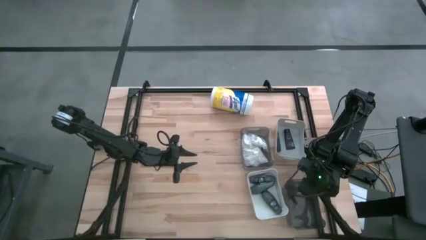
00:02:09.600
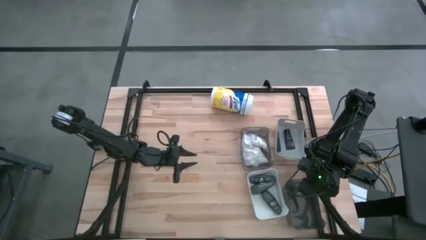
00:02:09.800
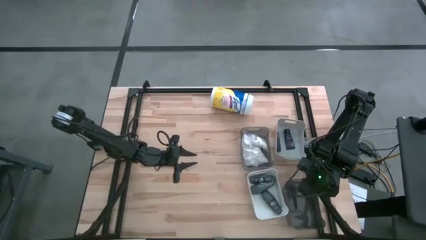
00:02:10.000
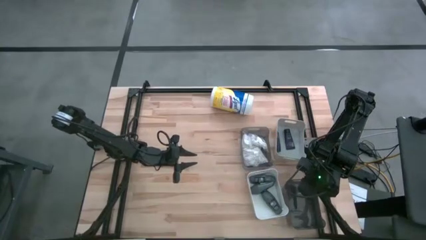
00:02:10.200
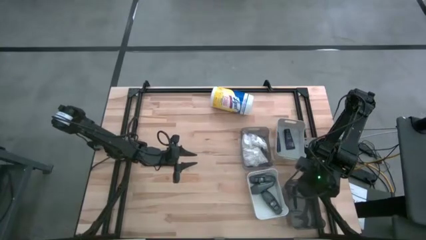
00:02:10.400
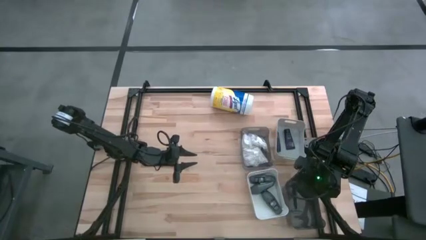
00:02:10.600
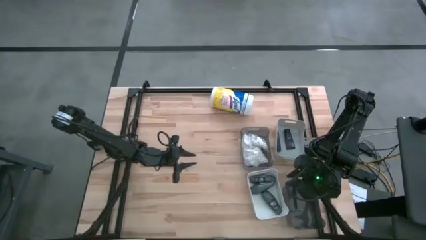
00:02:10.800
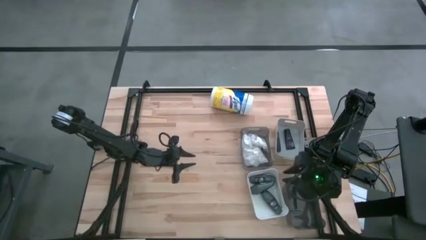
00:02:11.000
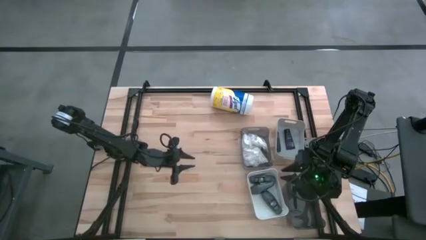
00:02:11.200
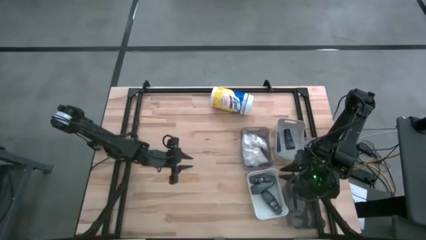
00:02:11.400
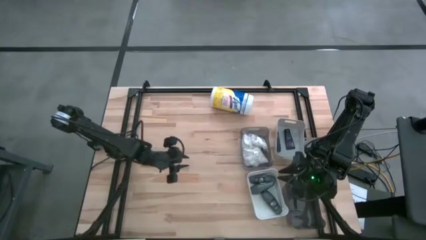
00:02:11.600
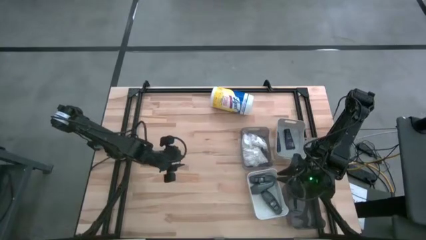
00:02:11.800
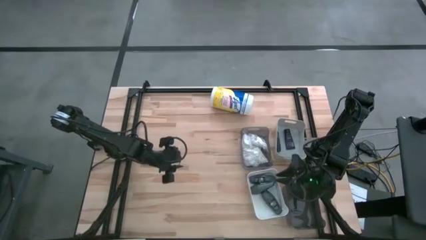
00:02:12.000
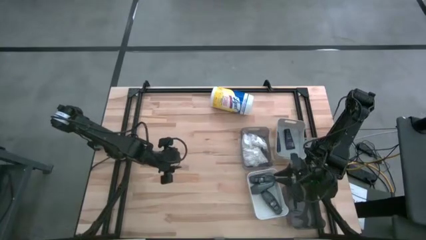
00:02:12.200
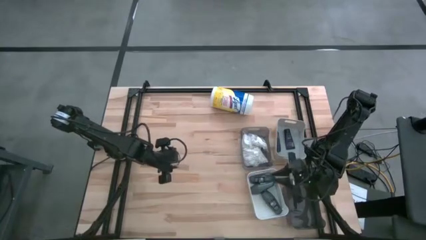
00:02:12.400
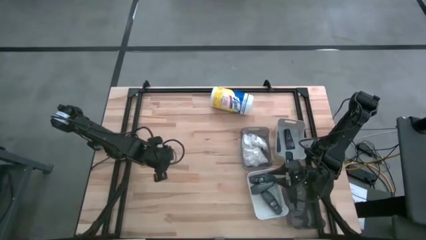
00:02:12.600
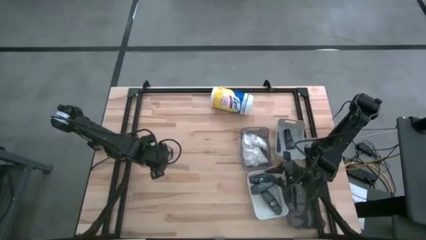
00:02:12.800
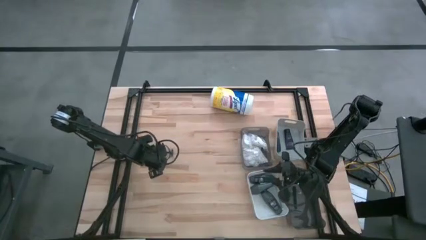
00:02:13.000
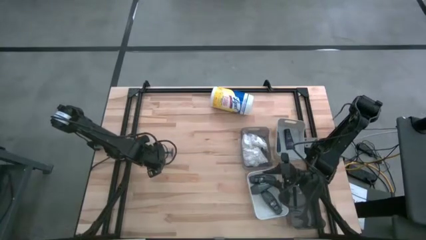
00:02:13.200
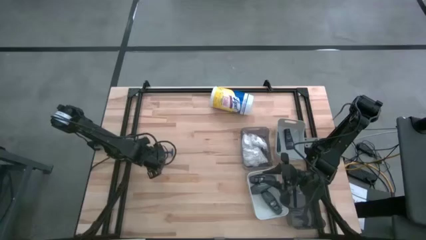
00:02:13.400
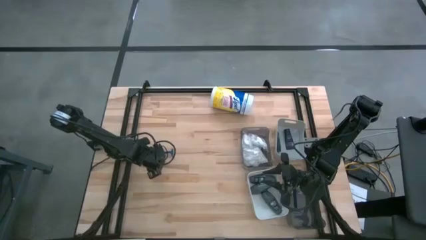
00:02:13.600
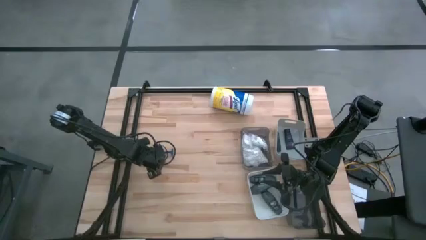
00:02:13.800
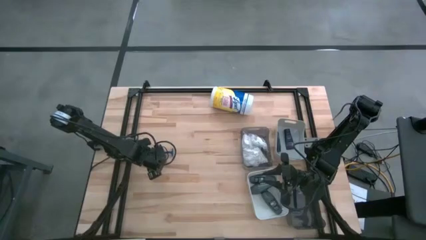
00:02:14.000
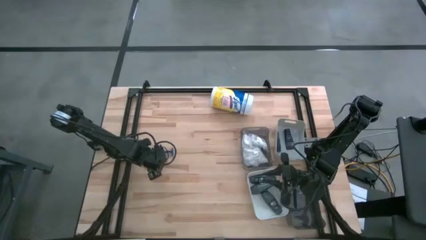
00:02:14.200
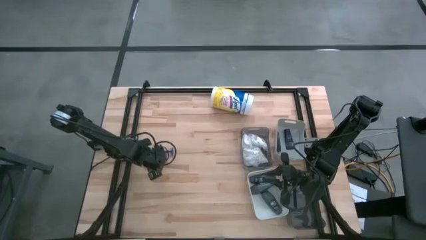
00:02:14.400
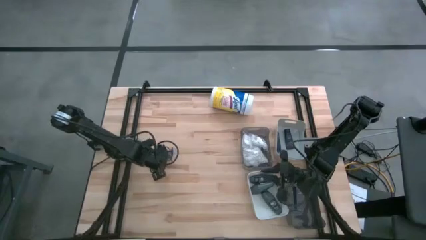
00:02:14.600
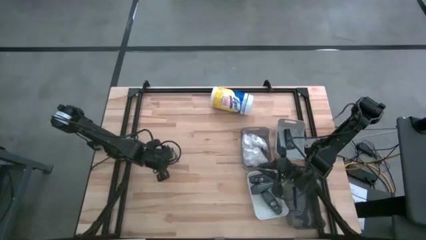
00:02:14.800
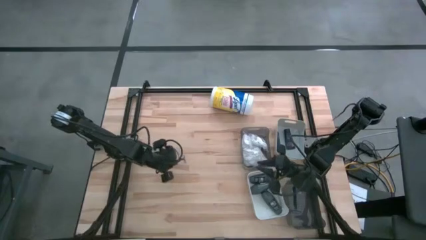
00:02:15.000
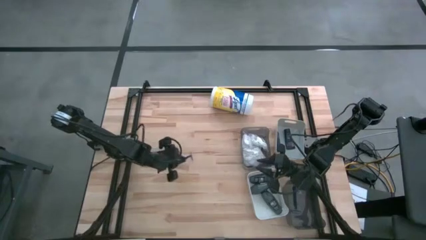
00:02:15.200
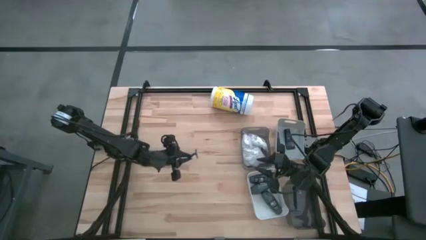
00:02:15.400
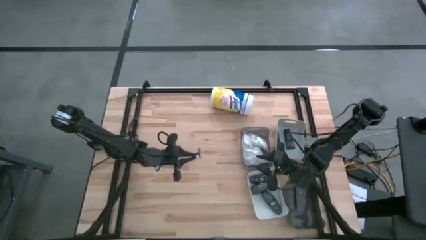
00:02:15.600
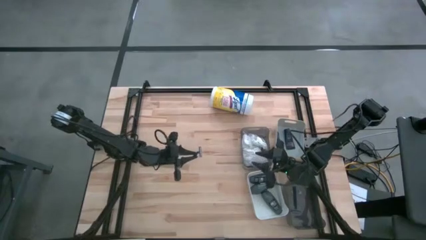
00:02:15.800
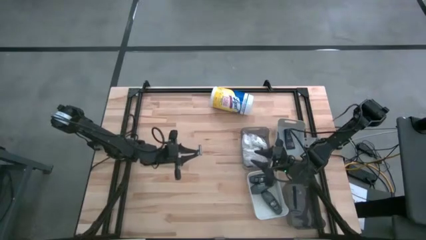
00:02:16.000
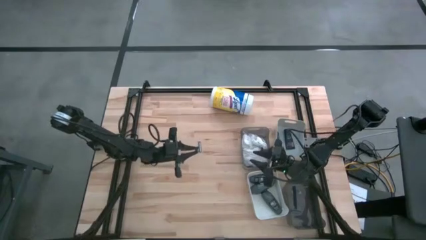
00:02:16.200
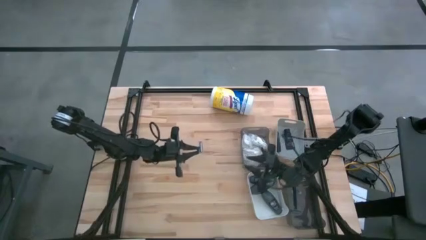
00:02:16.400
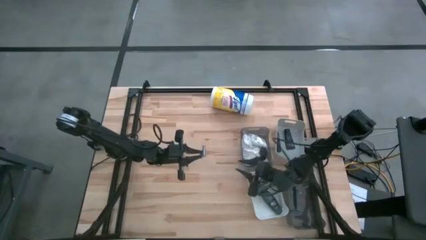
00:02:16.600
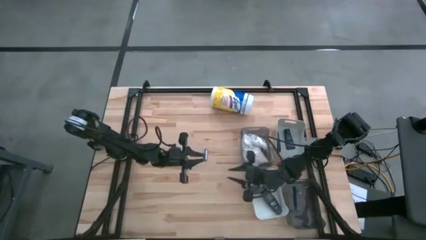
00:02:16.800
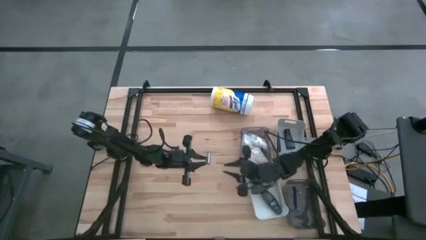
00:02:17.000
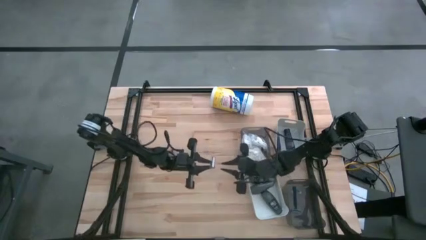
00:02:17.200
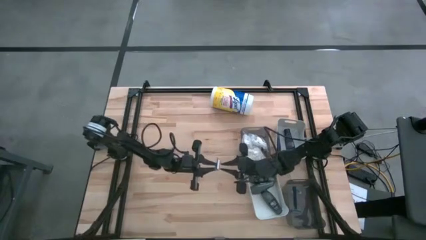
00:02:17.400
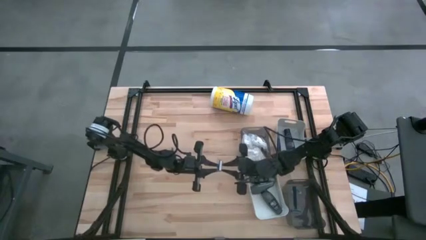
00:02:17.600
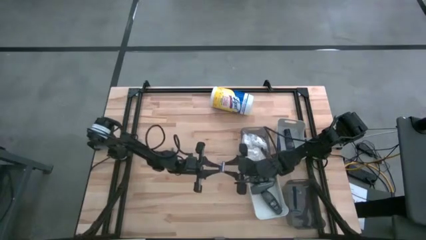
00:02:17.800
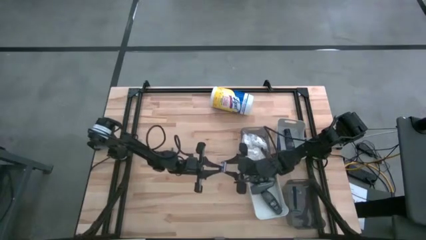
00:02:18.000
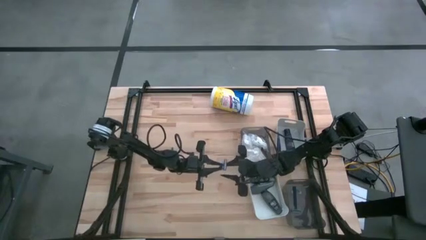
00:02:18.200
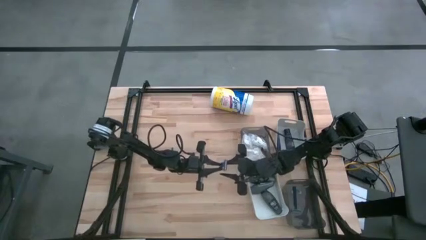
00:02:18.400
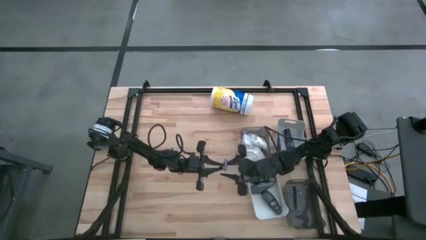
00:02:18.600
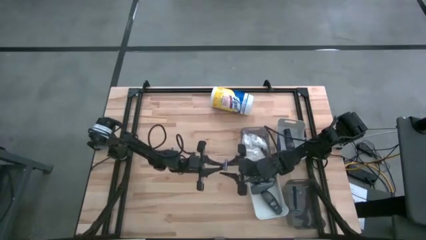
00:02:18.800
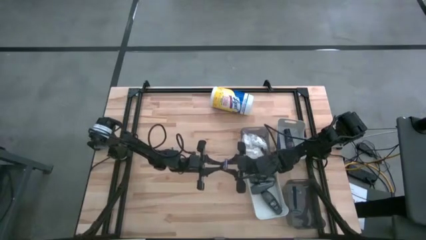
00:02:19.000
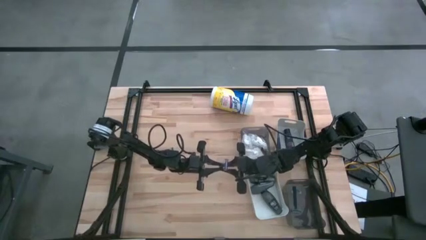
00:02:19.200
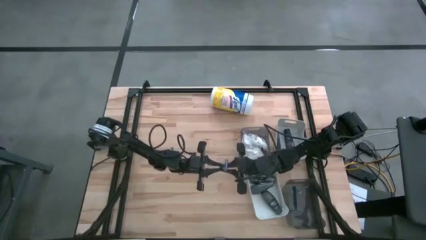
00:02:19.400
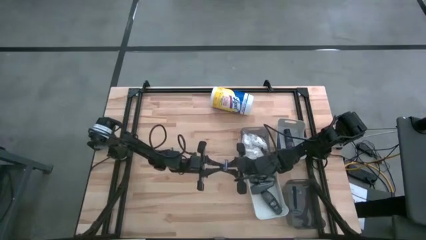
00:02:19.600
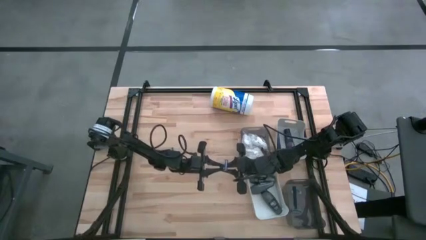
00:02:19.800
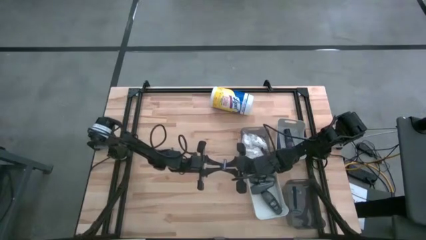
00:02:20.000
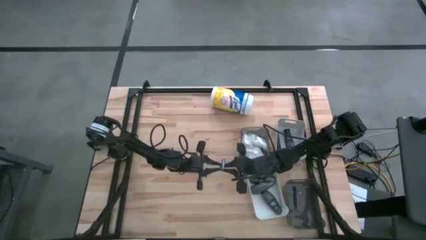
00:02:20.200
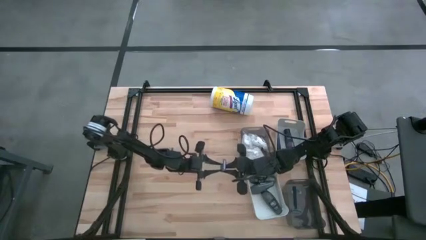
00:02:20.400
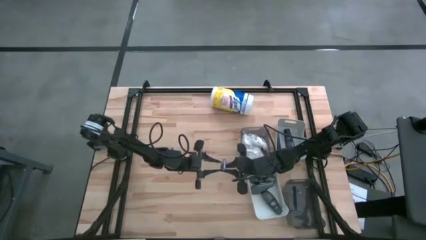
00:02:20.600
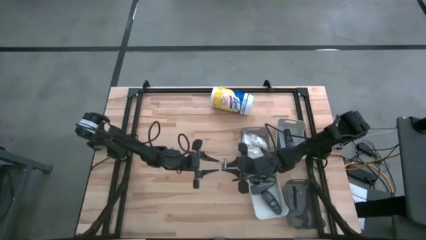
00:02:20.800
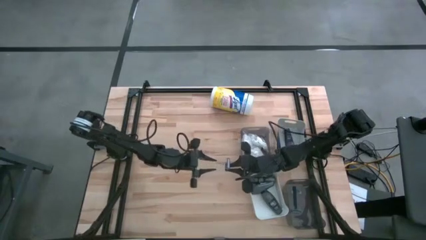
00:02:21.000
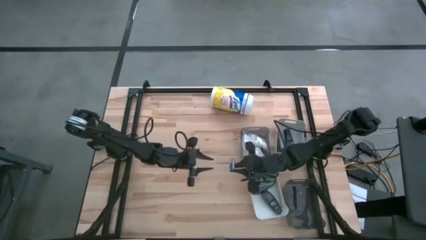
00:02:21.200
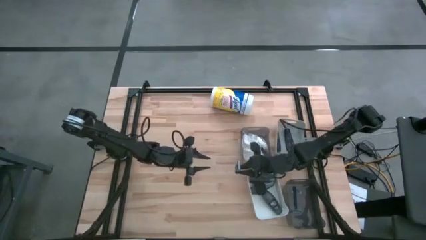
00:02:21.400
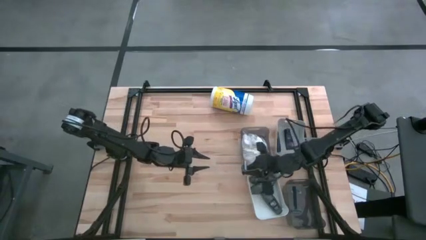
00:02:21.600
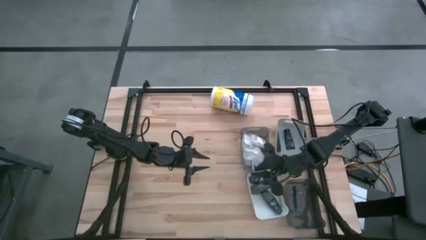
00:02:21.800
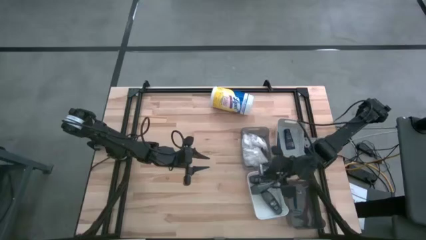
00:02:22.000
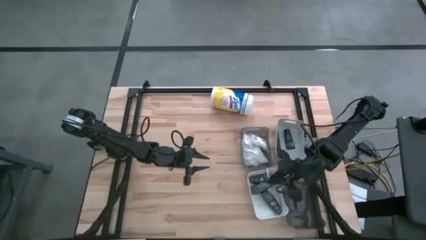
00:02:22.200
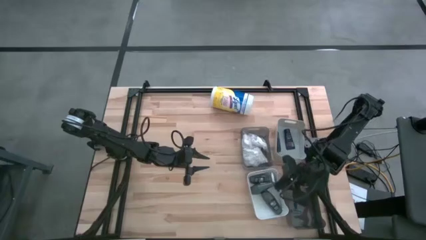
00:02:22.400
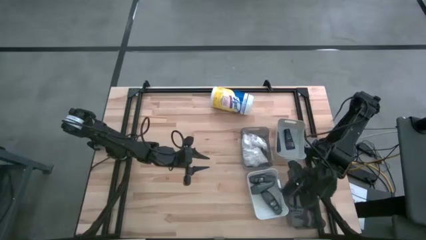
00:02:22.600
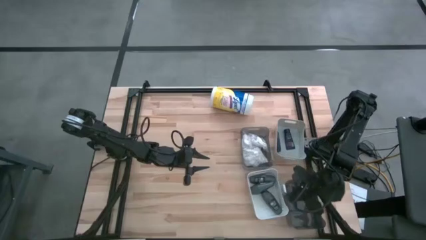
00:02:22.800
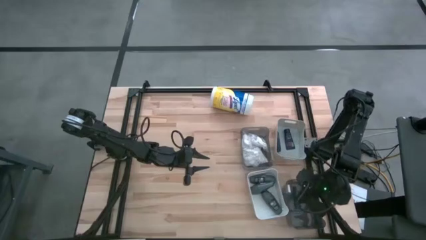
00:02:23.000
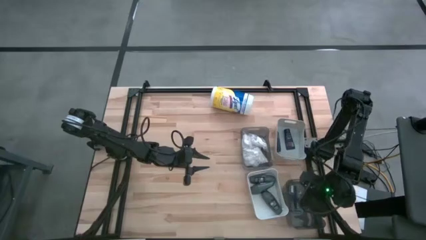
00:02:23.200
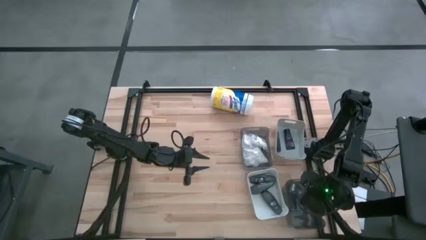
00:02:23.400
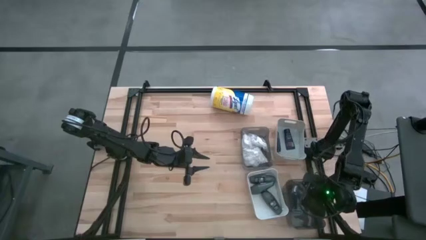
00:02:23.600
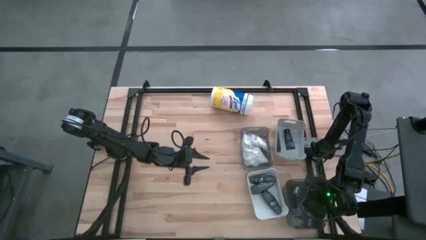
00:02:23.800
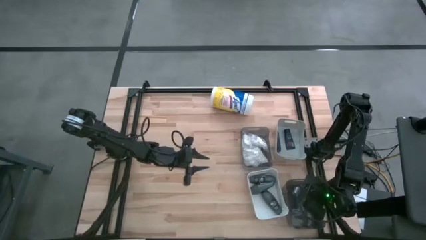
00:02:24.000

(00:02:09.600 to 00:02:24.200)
Task: Pick & Place Travel size toiletries
Put the bottom razor into the bottom black bin
